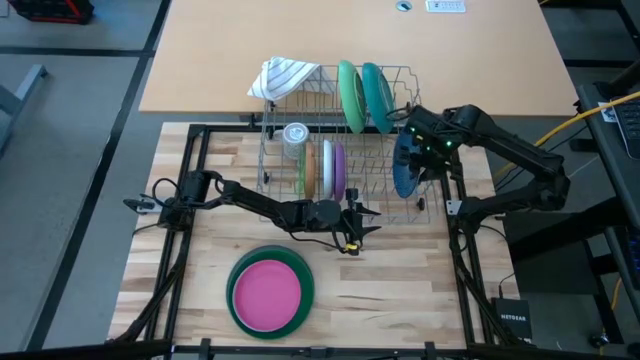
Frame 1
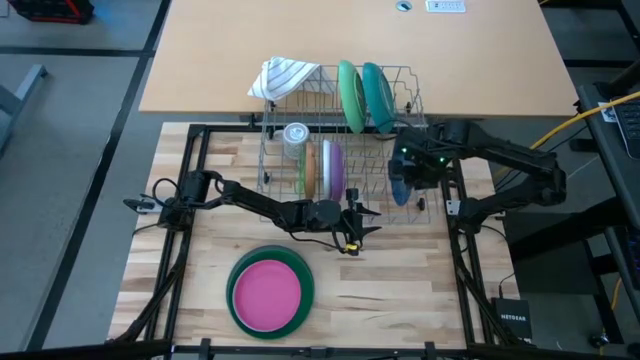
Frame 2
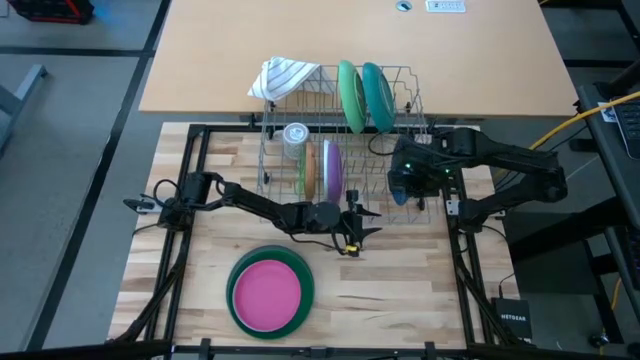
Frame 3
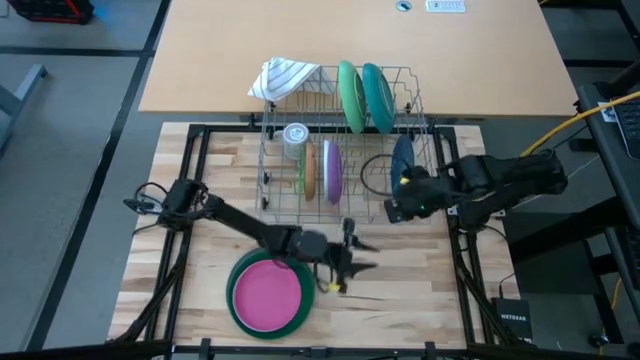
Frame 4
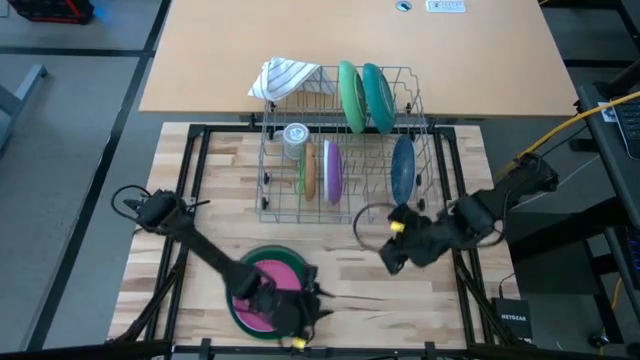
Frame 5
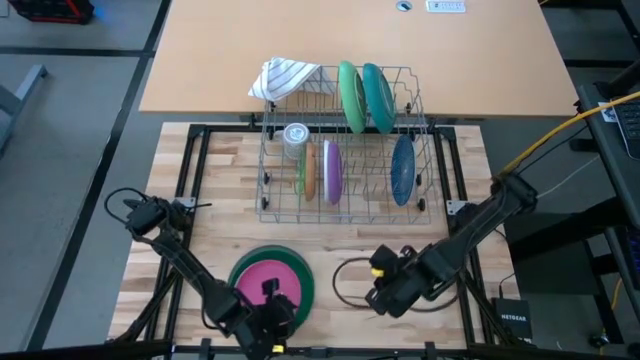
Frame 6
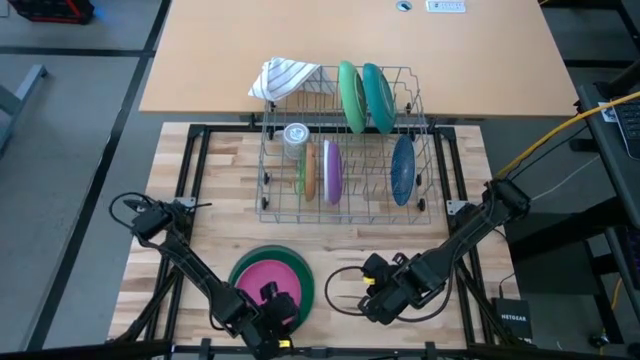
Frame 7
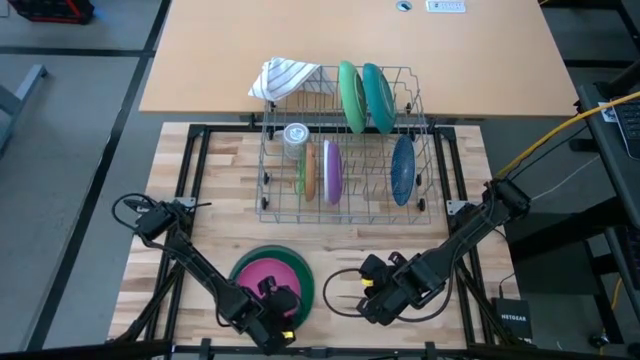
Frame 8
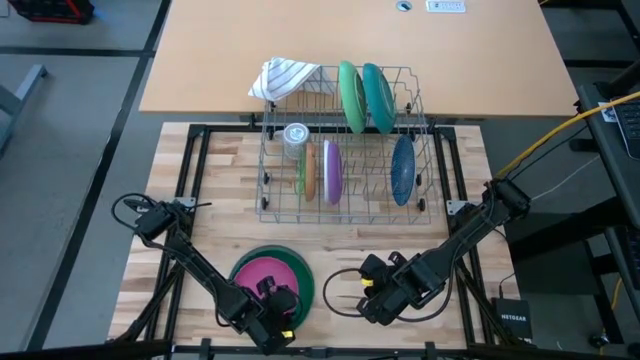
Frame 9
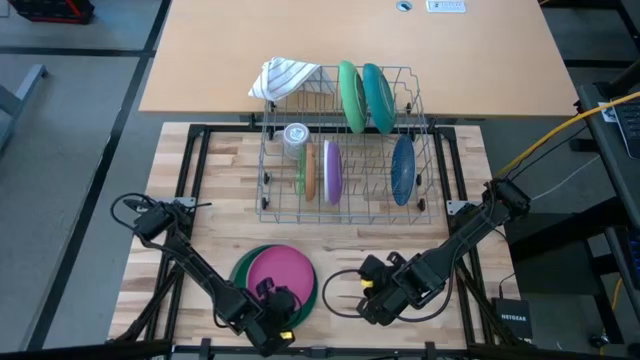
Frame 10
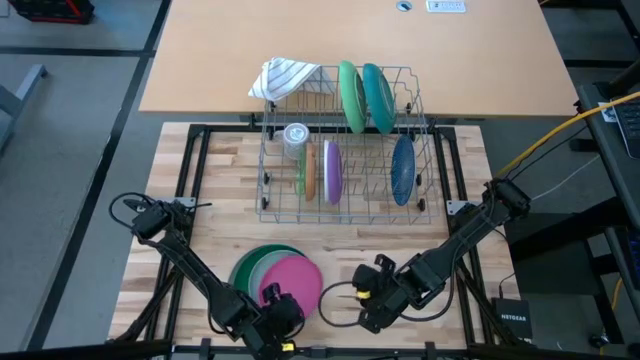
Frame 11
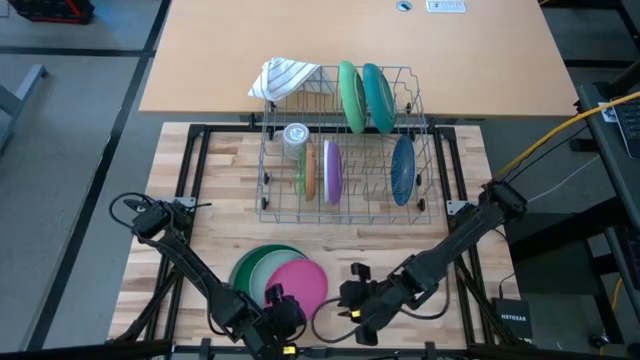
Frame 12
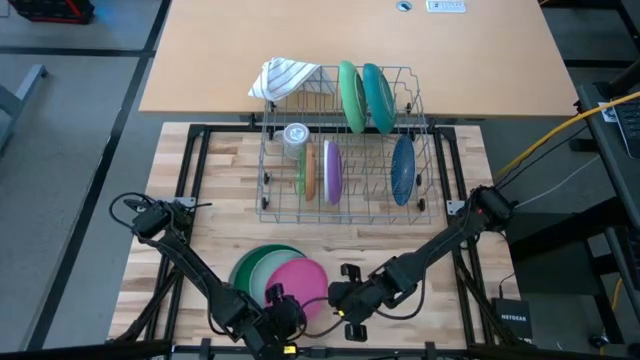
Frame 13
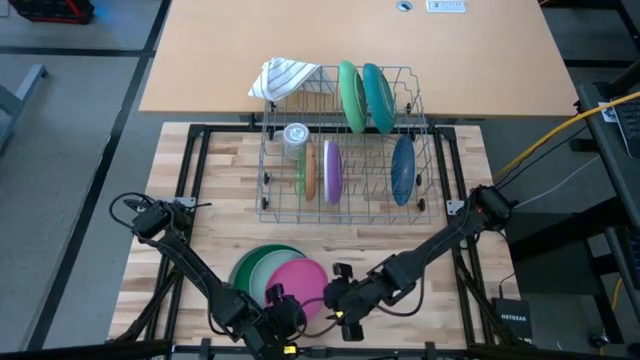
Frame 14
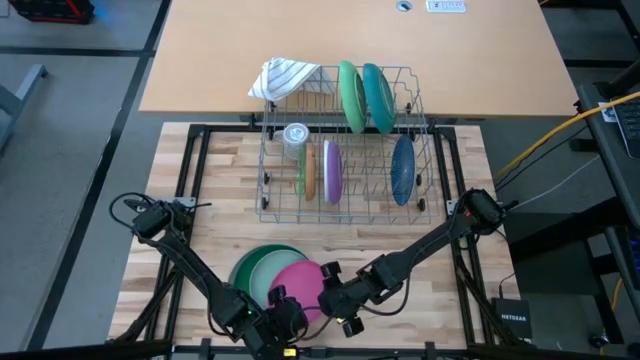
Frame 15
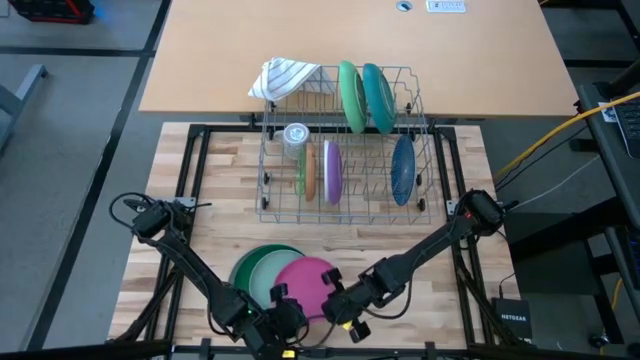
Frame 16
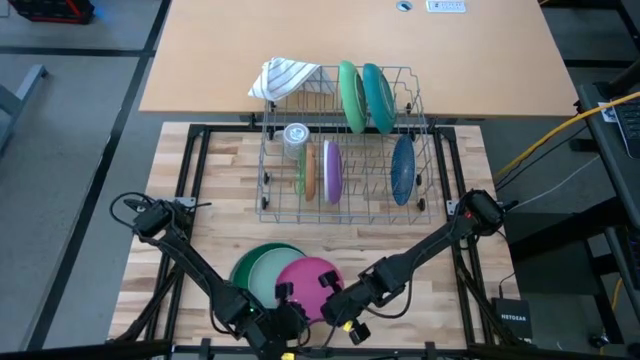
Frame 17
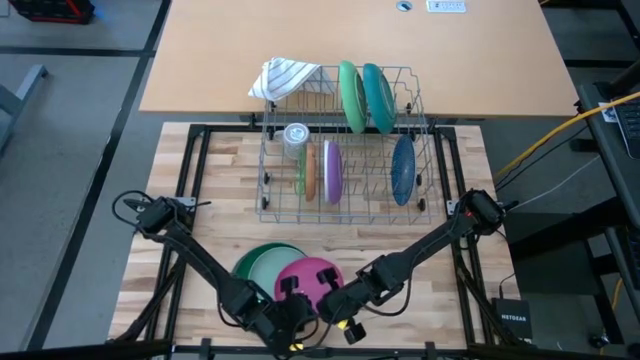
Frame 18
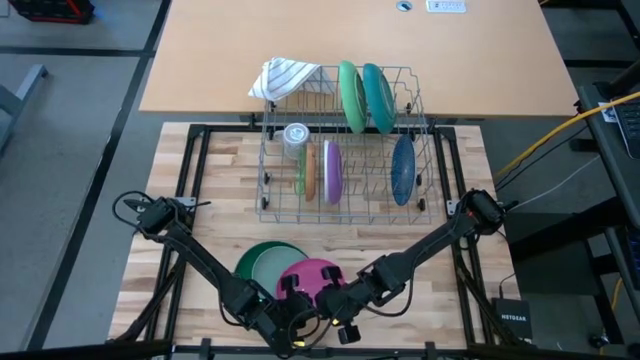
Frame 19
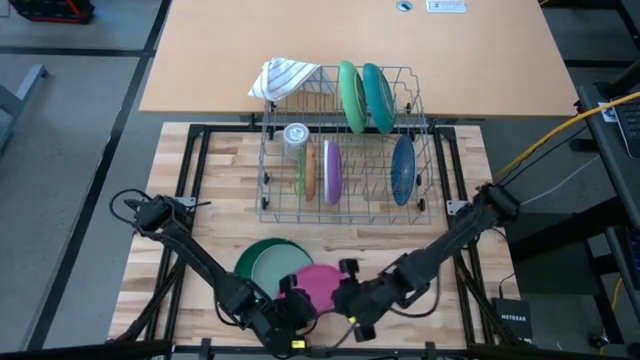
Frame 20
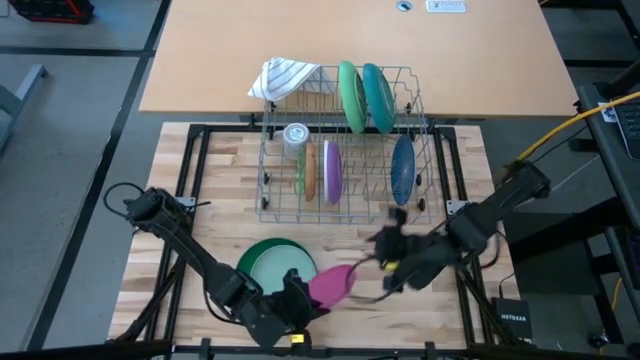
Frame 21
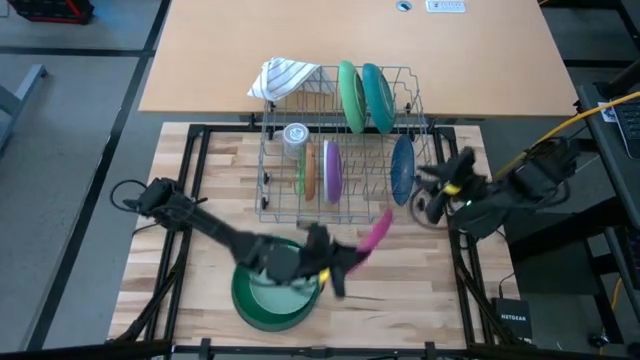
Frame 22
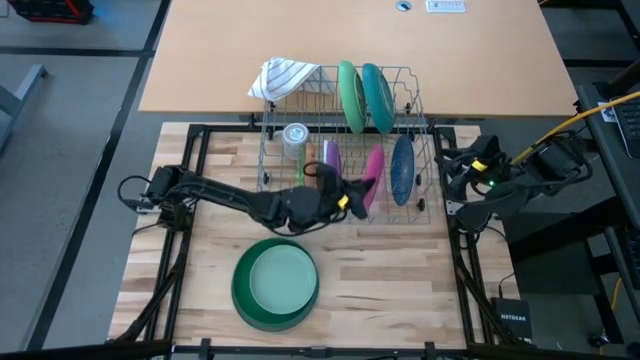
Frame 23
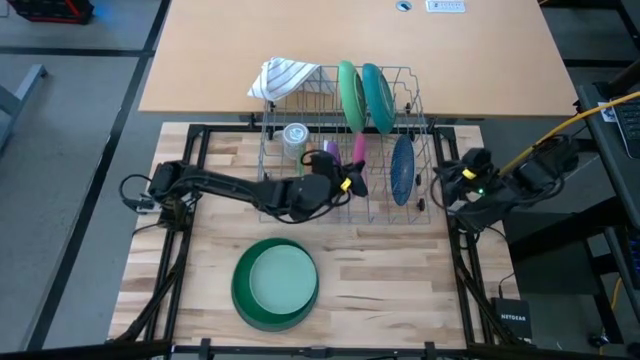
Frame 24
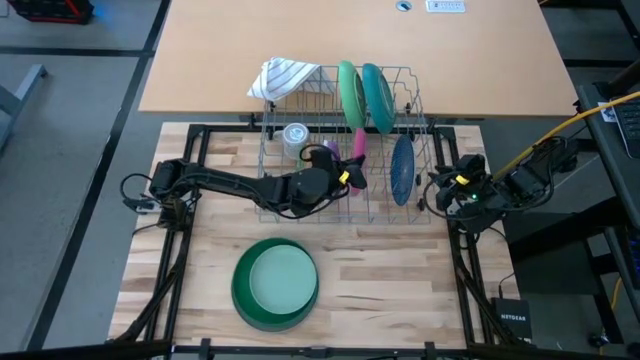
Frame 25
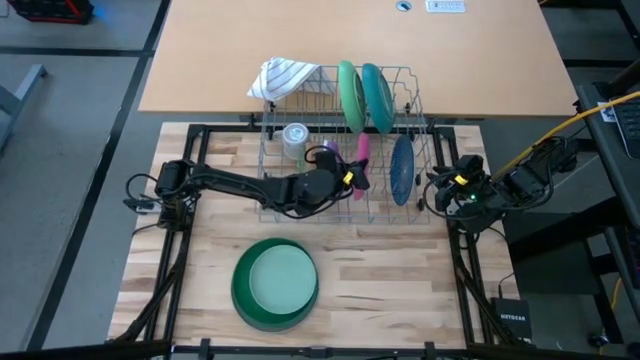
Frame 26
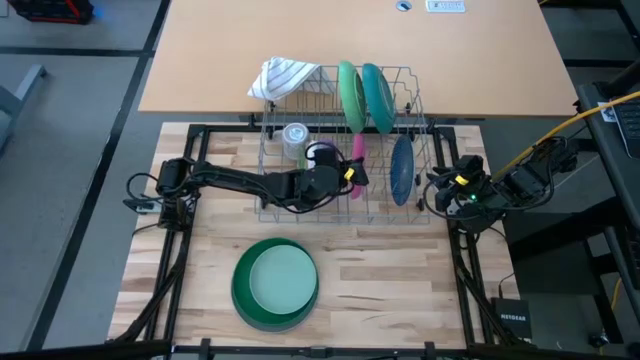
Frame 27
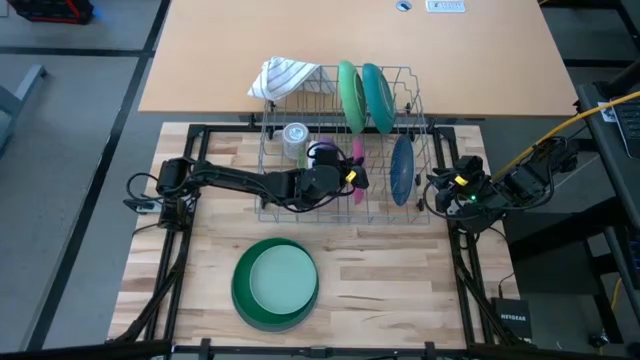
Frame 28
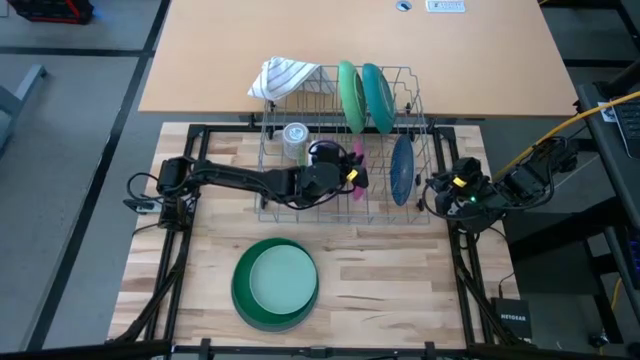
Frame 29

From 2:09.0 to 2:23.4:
Task: Sort dishes
Put the pink plate in the dishwasher rack

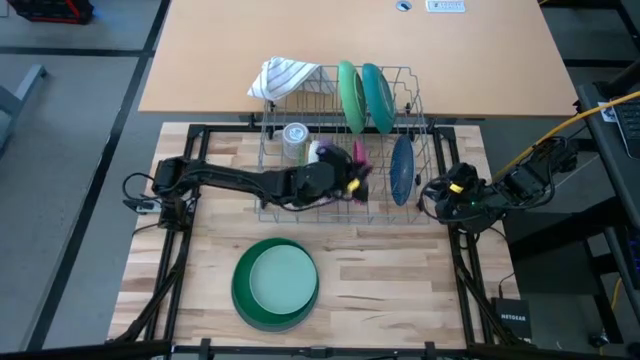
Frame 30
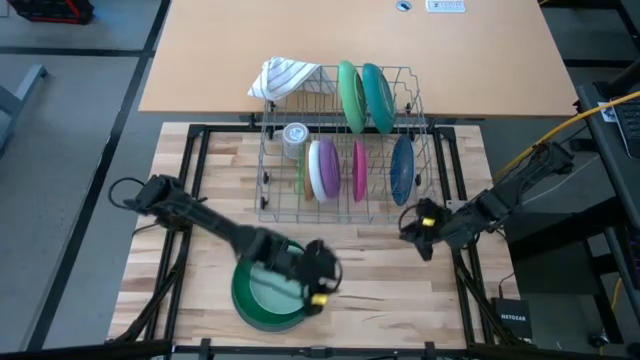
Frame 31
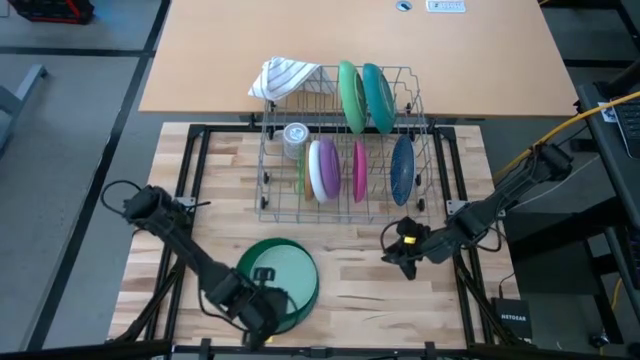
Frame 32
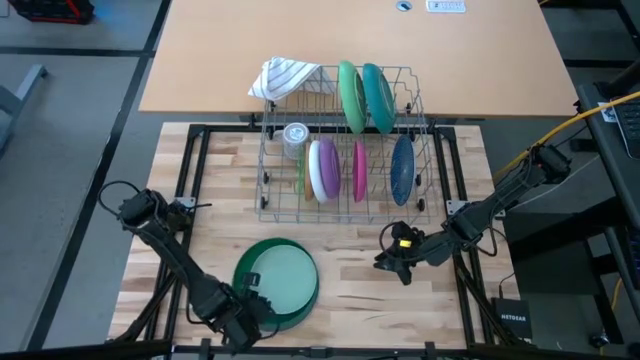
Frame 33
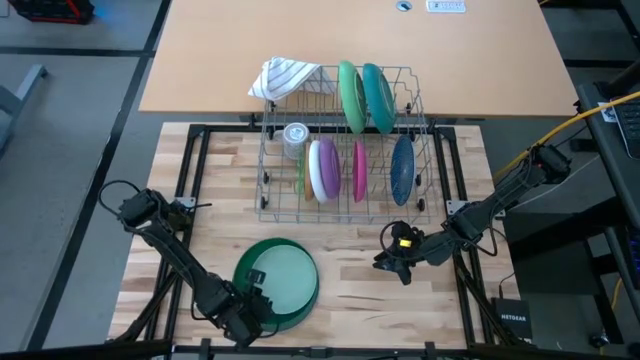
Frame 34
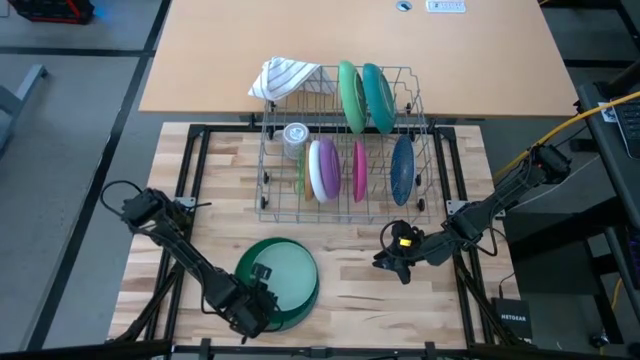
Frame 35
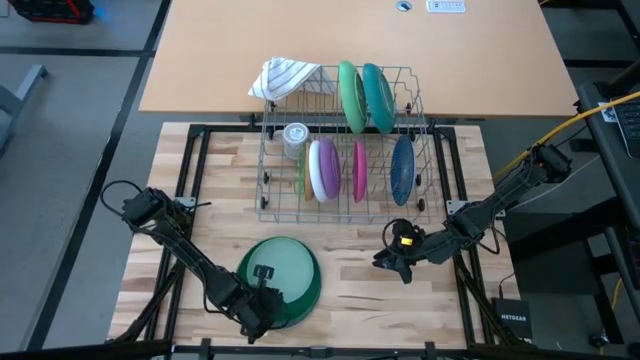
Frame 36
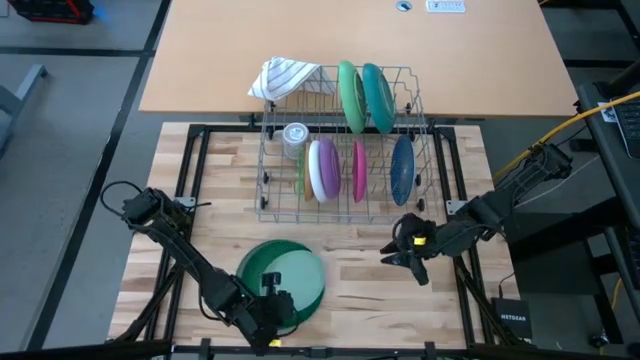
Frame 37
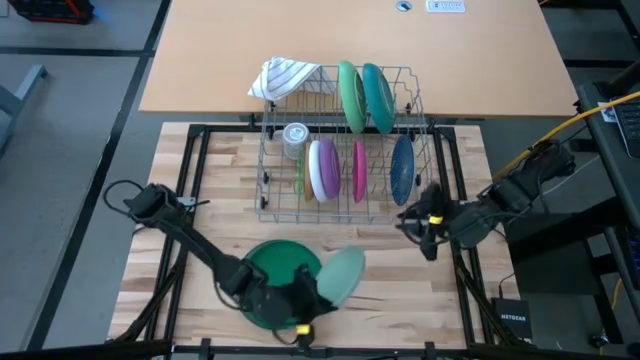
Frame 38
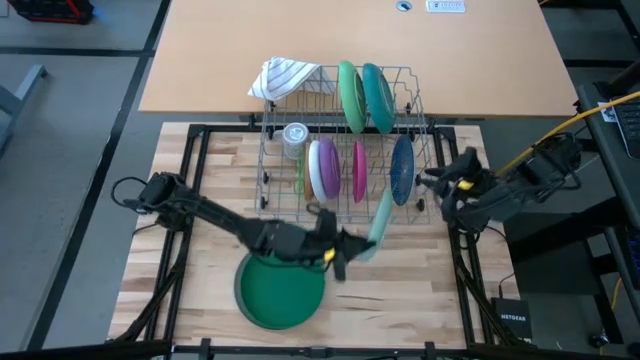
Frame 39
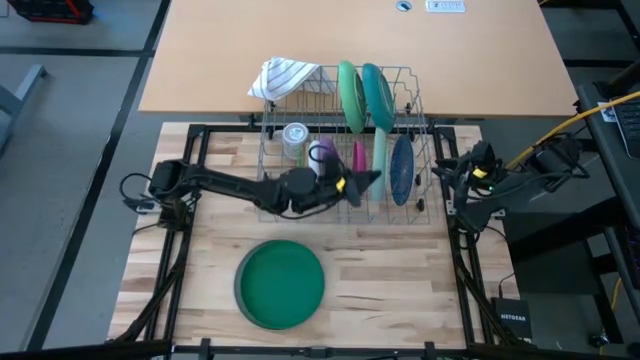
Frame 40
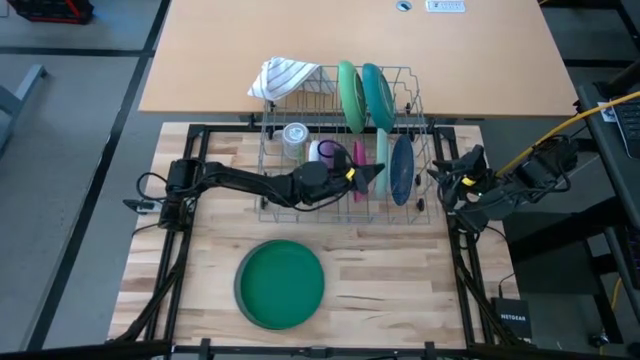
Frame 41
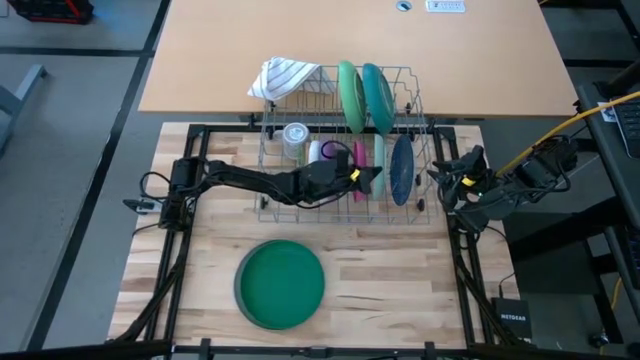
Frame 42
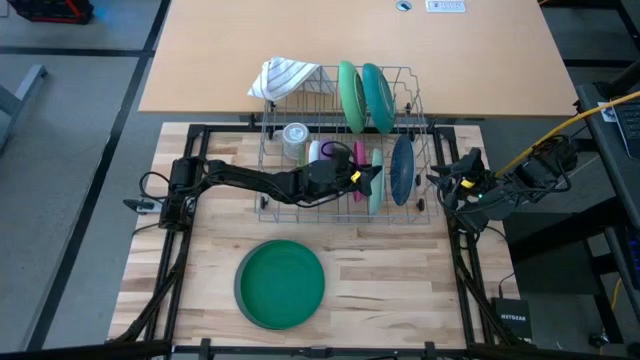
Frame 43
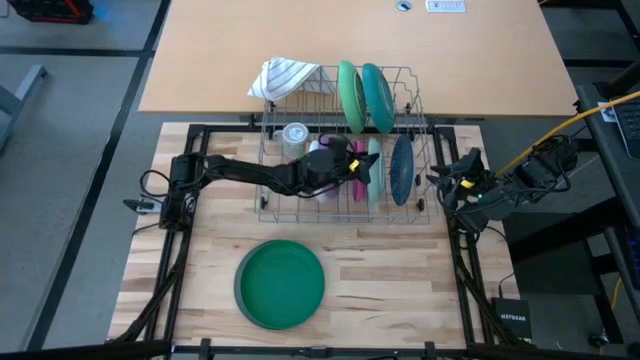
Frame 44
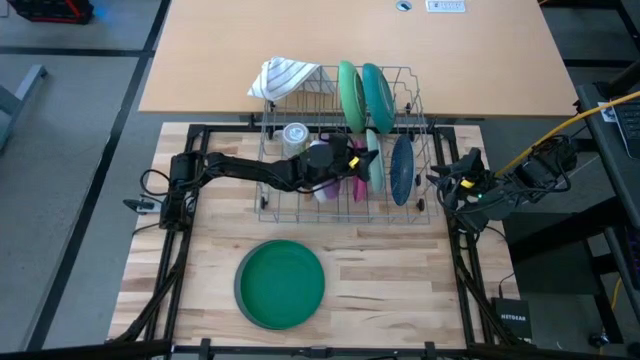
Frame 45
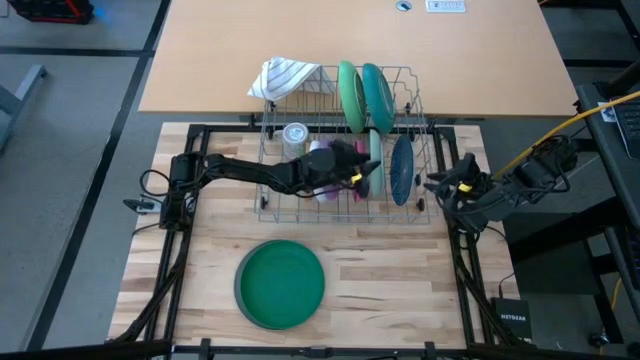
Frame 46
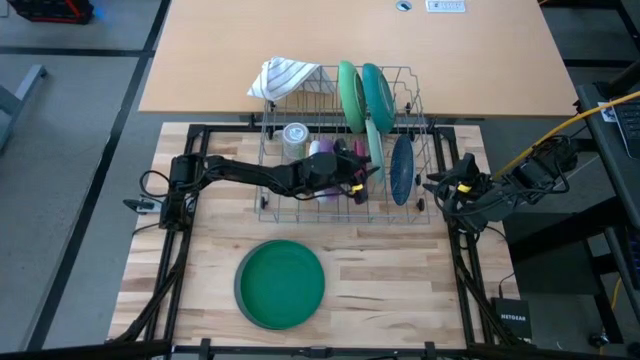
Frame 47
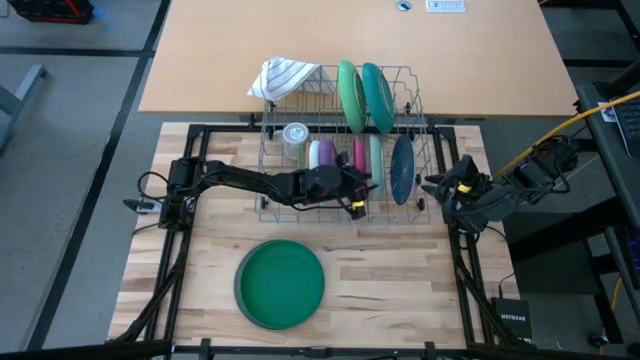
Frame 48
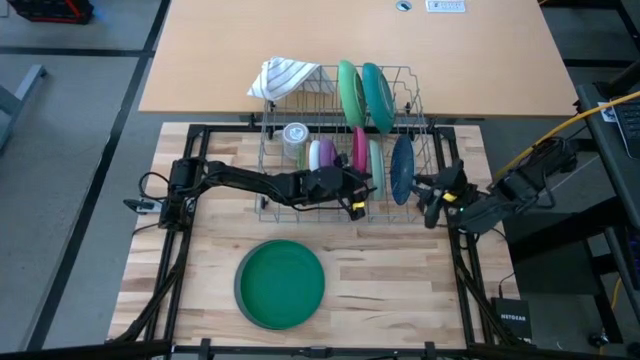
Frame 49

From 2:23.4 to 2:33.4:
Put the light green plate in the dishwasher rack
